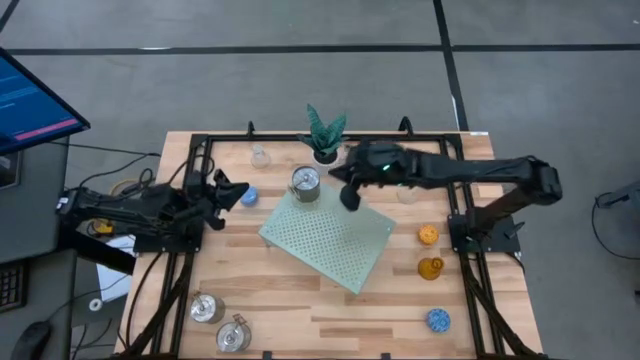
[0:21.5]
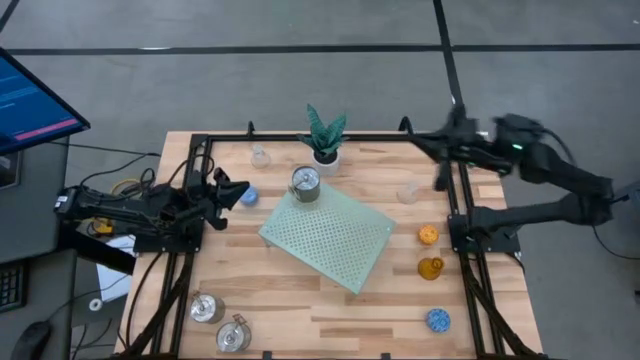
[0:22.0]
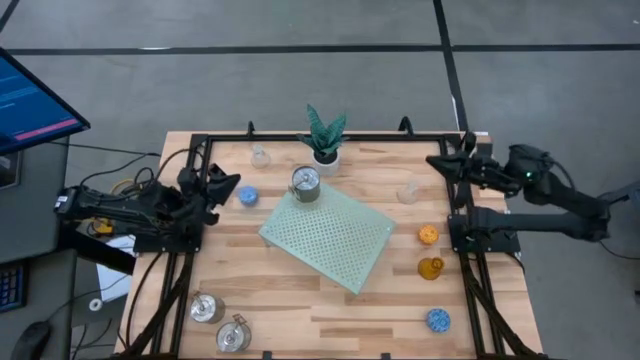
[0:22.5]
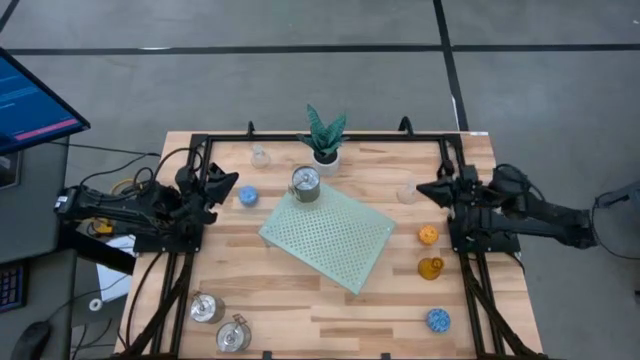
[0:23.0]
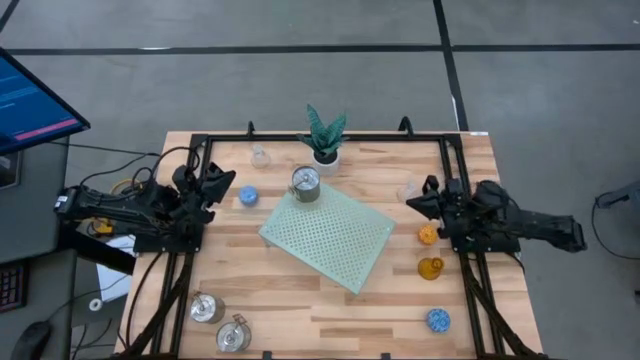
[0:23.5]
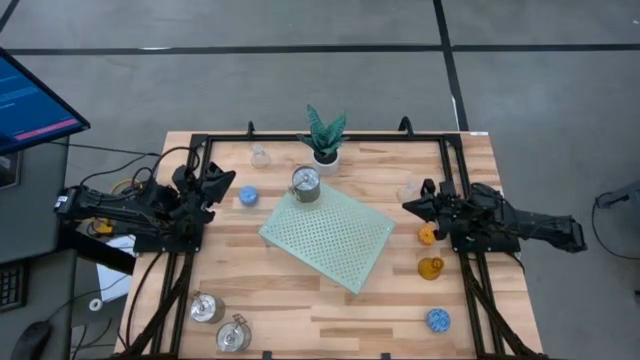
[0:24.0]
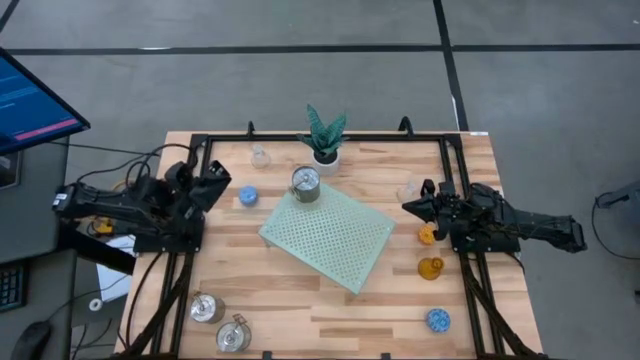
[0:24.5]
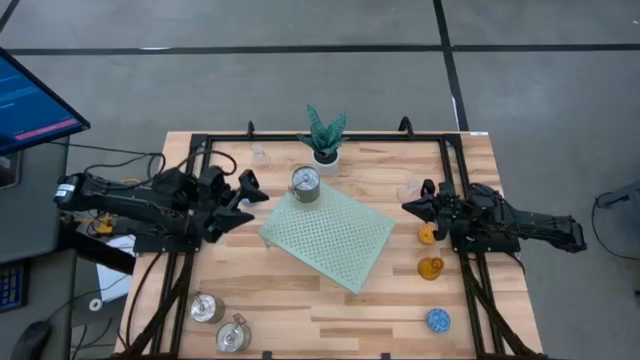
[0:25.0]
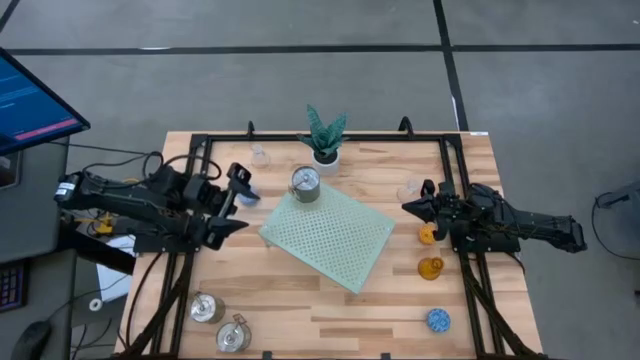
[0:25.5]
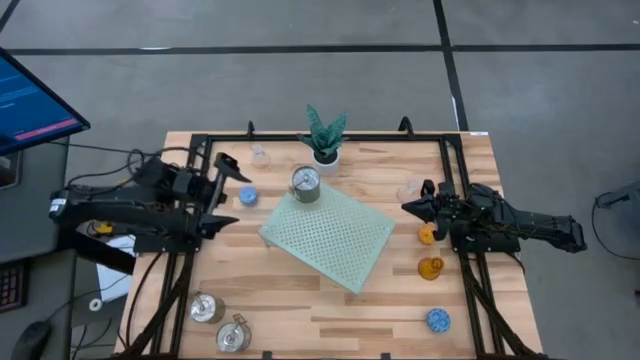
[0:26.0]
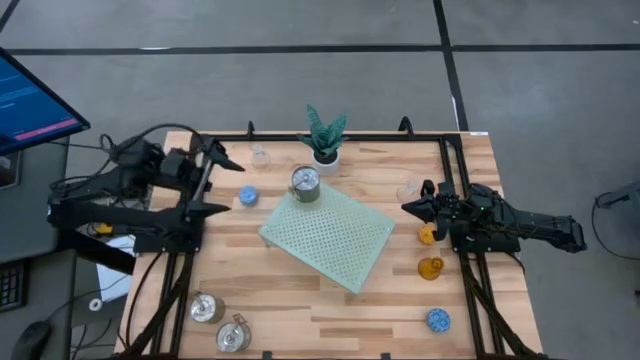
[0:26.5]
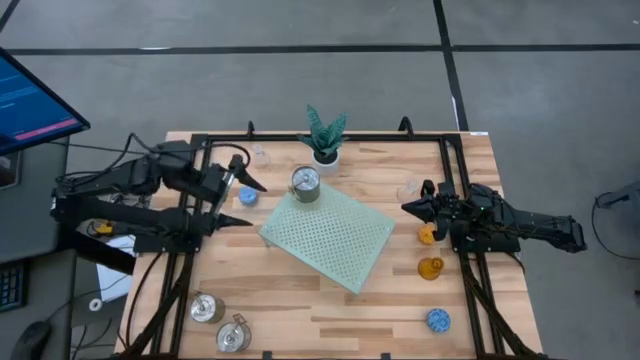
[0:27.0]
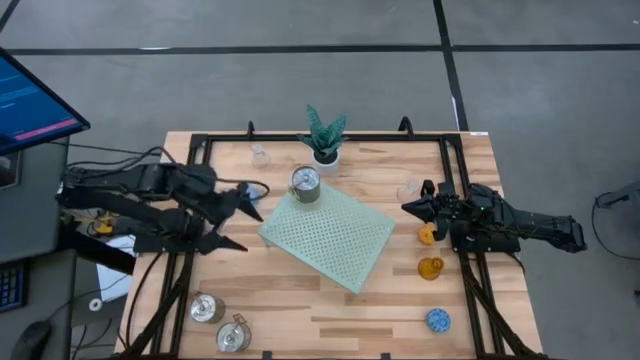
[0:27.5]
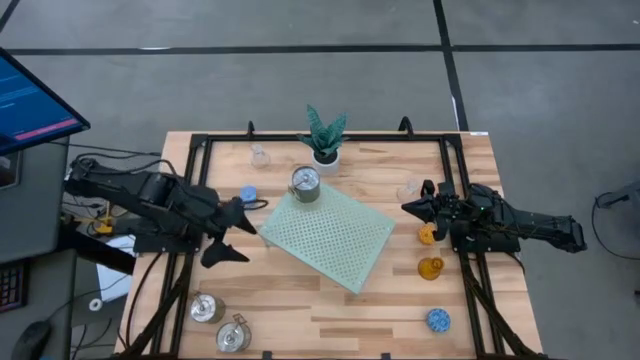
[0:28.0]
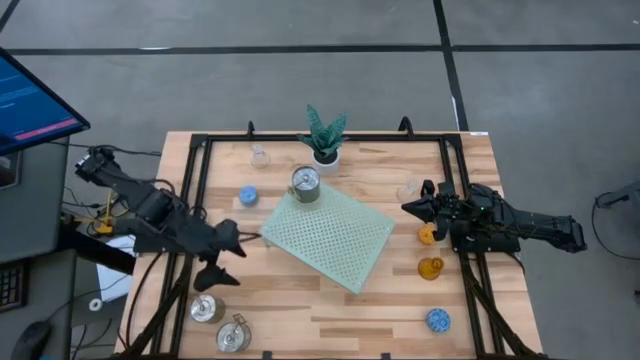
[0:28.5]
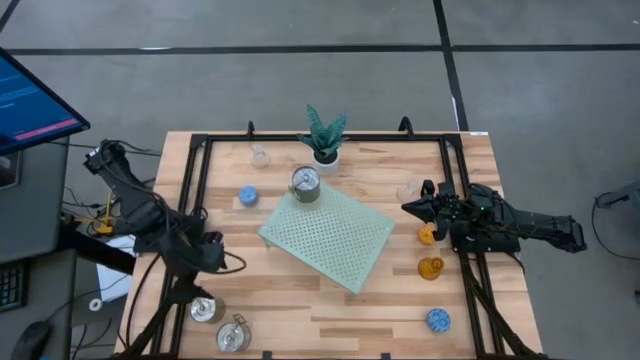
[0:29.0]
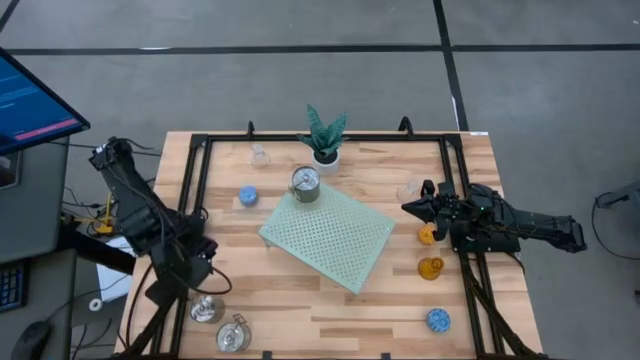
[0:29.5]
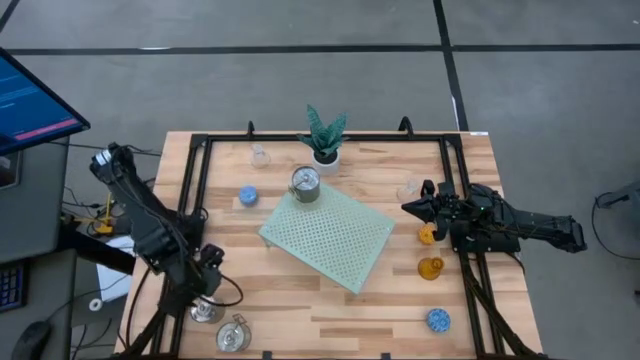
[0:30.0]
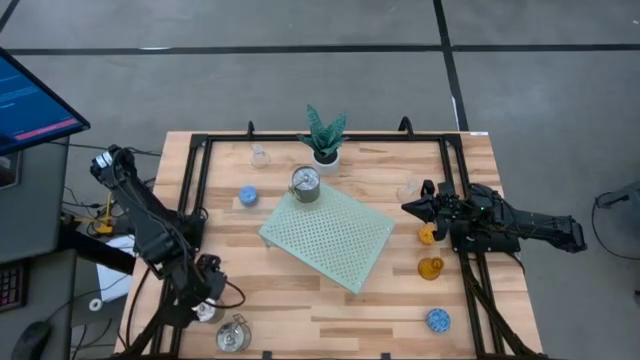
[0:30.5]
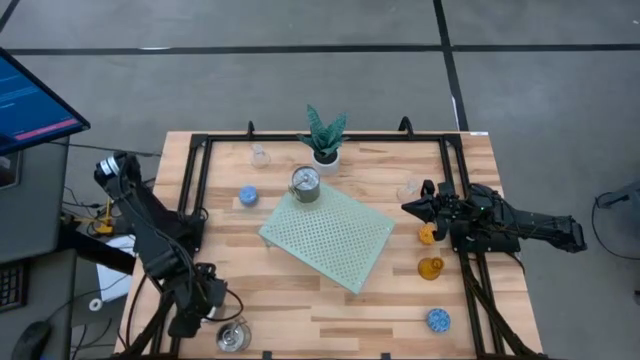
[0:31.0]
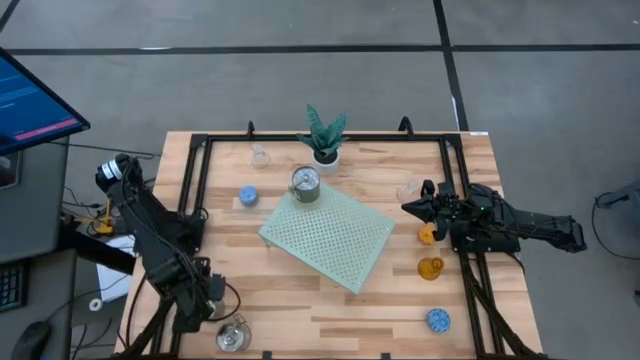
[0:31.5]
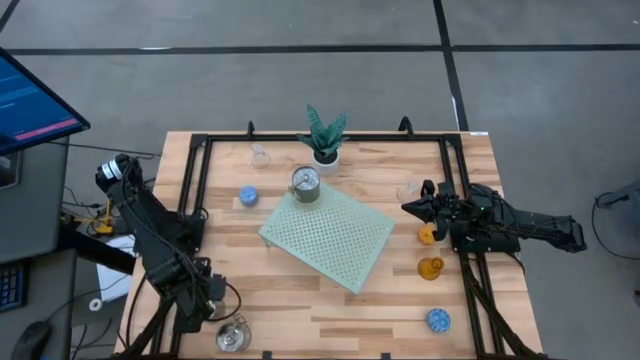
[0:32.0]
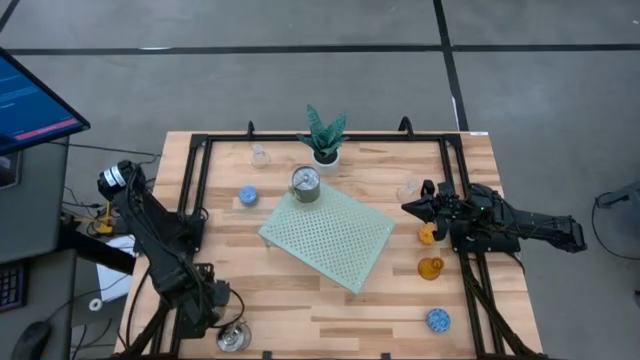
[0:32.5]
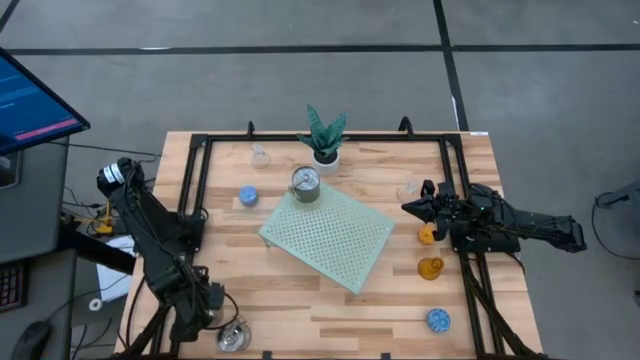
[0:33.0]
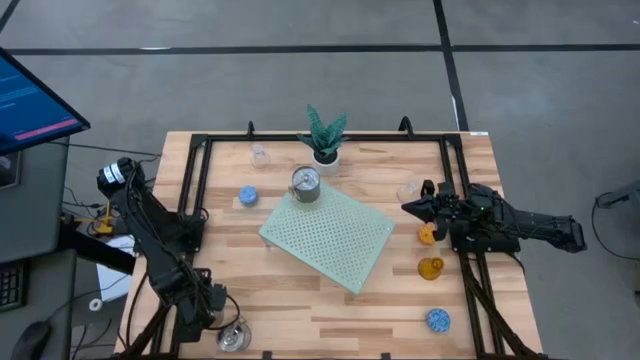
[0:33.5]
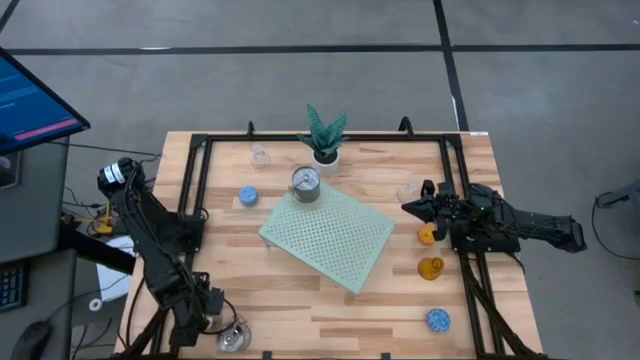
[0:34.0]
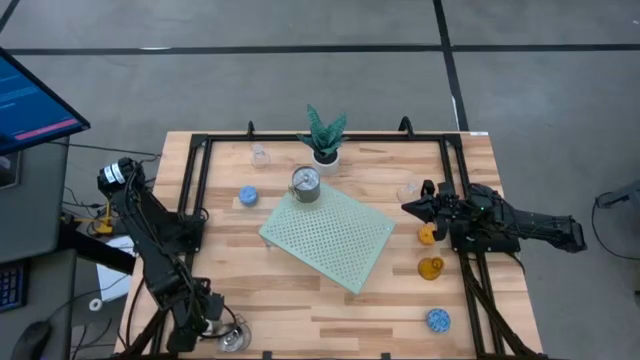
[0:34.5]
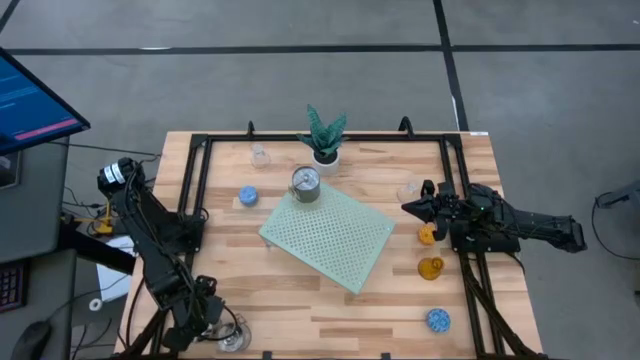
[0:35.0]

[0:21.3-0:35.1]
Task: Pick & Place candle stick holders
Put the left silver scented candle on the shelf

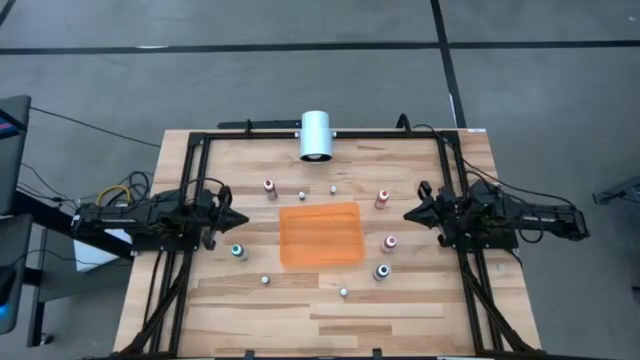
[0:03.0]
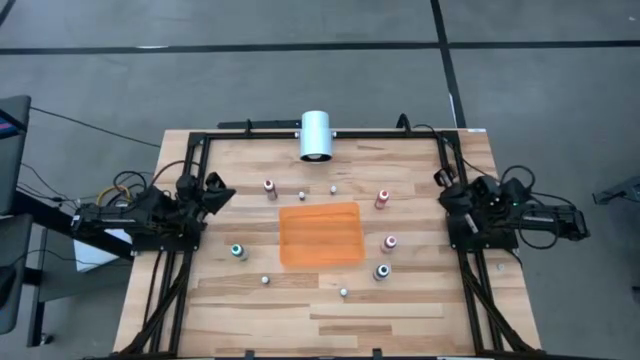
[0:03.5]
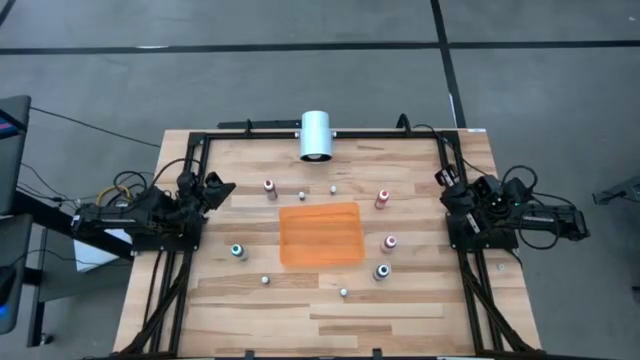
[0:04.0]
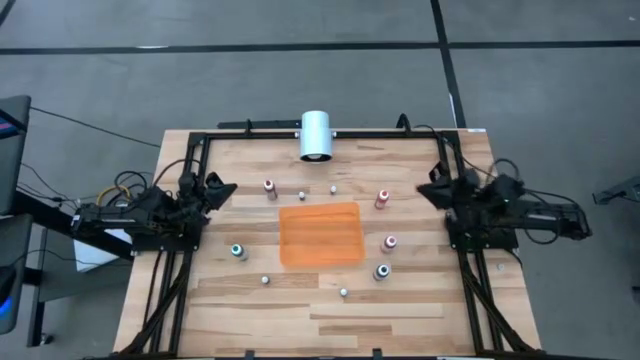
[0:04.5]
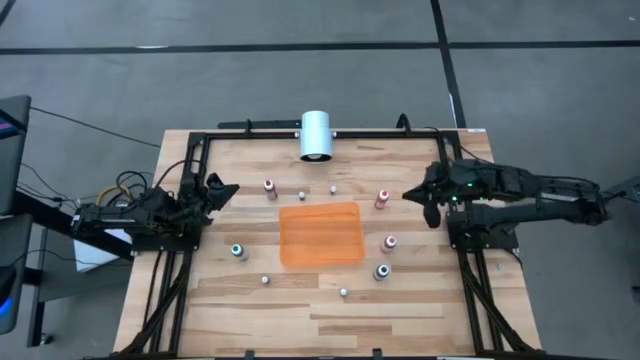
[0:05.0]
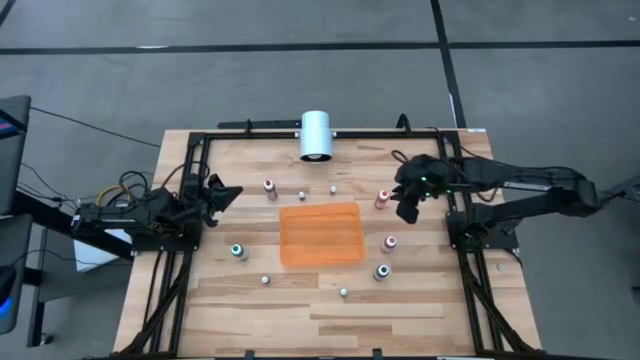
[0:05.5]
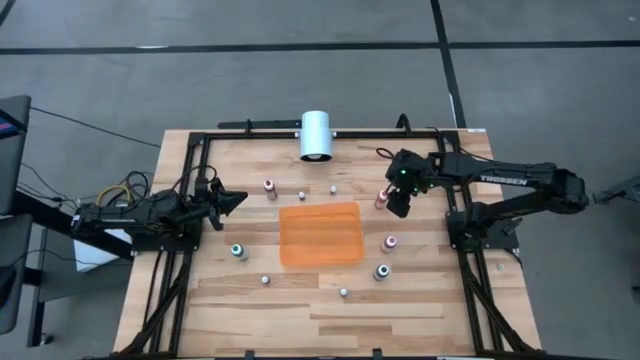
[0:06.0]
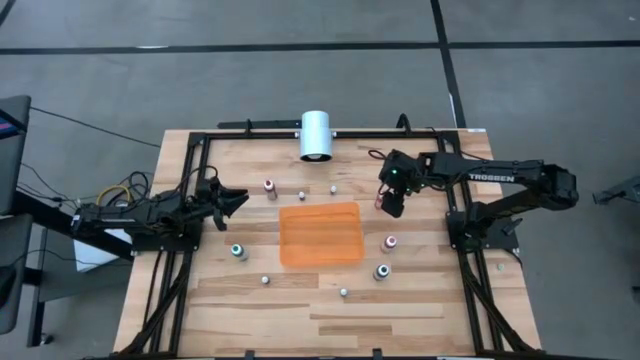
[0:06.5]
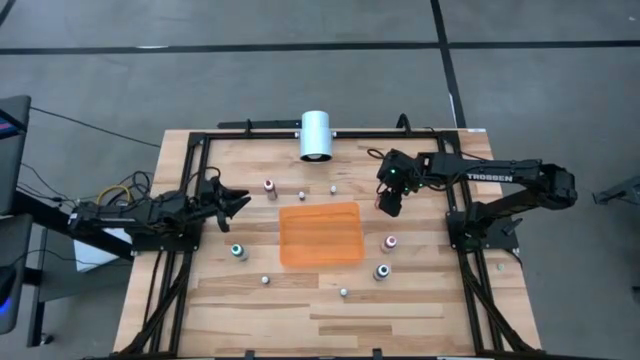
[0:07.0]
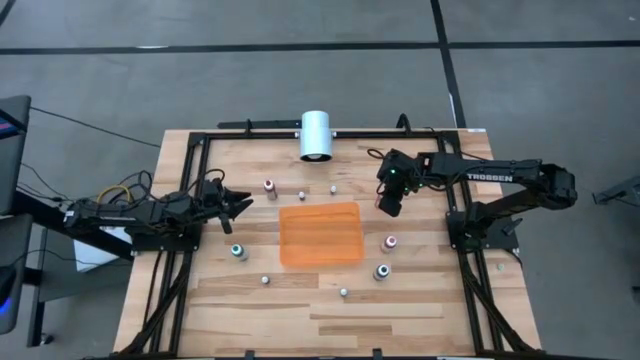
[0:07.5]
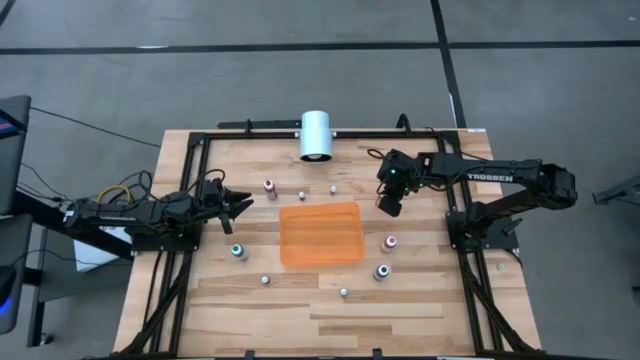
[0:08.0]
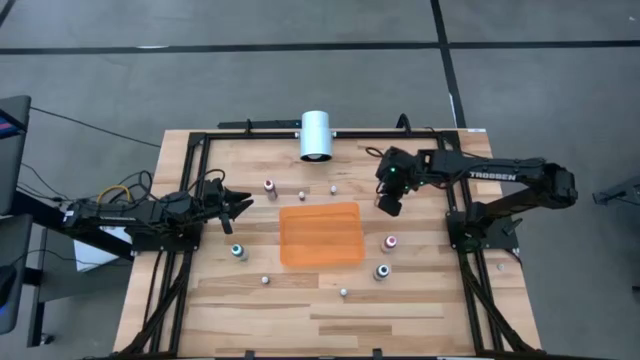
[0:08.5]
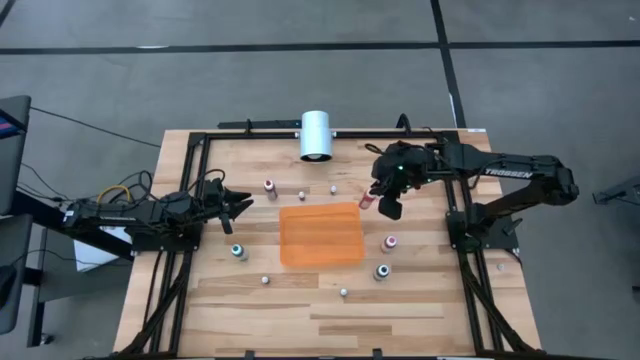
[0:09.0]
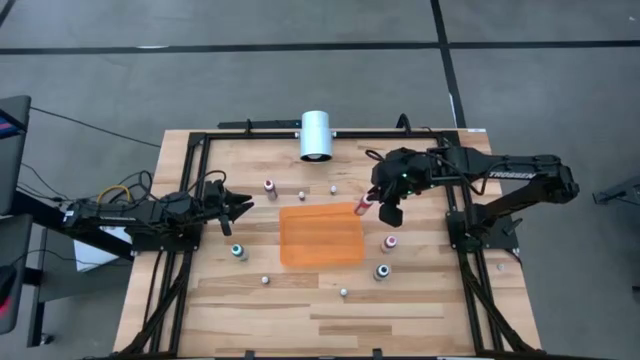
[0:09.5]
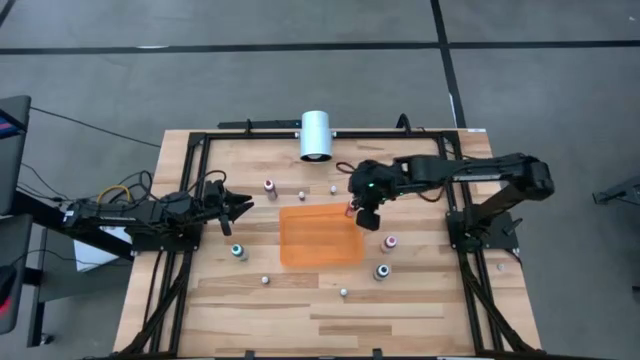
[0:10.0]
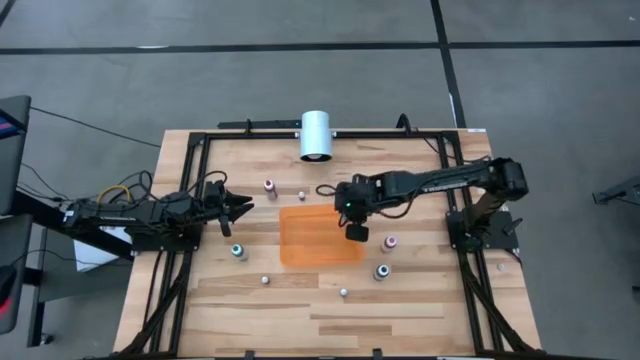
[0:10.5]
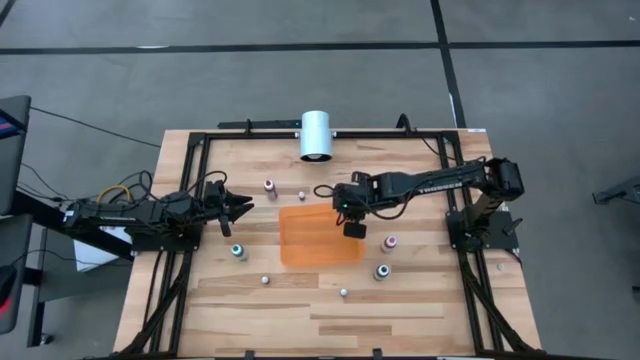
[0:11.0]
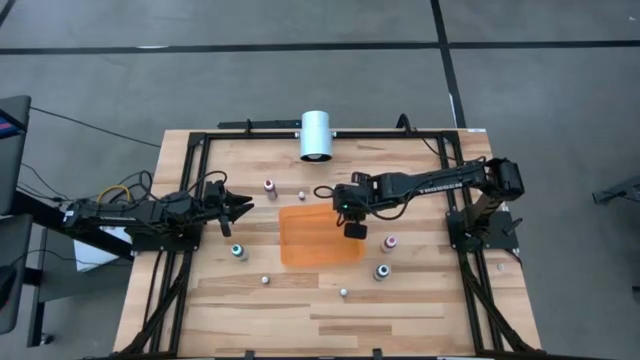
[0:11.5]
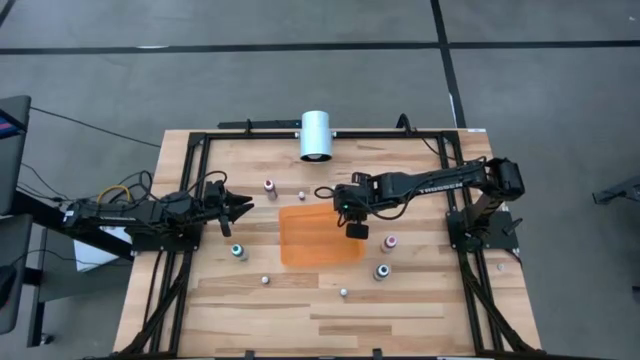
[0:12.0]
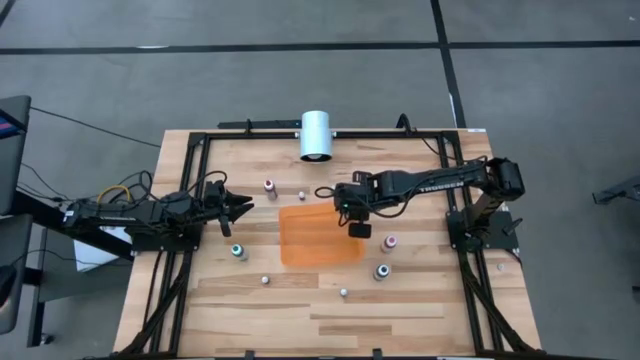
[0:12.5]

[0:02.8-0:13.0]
Task: Pick & Place food coloring
Put the large orange food coloring bottle into the orange container
